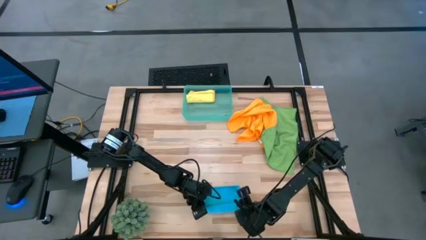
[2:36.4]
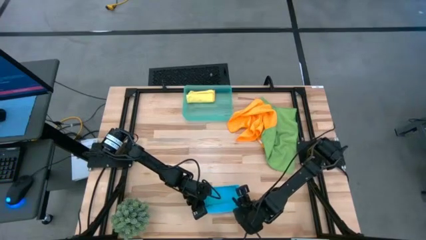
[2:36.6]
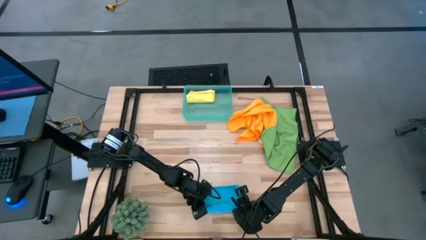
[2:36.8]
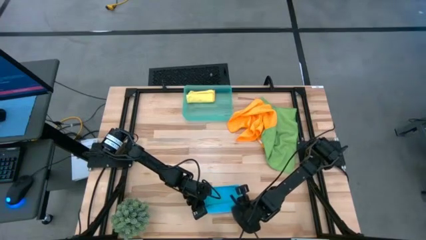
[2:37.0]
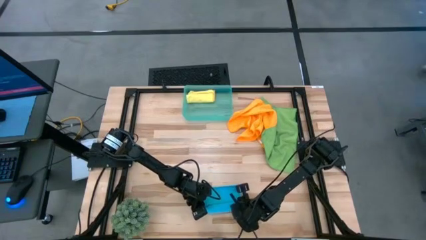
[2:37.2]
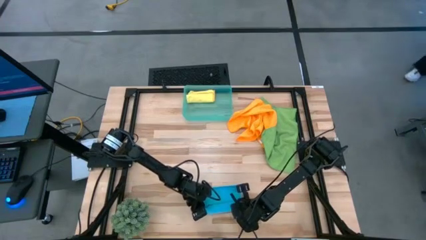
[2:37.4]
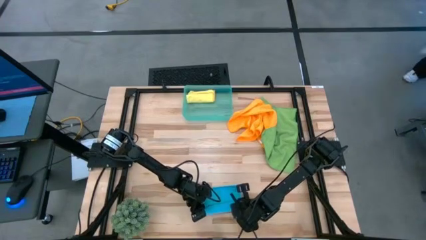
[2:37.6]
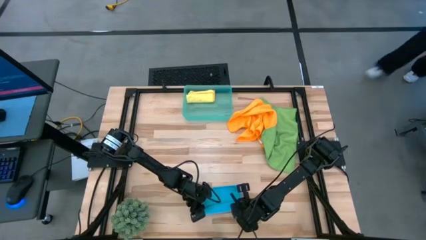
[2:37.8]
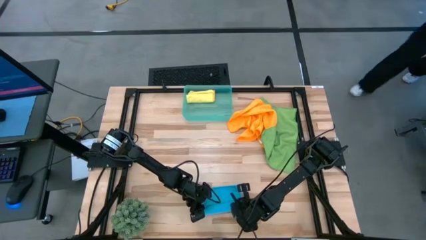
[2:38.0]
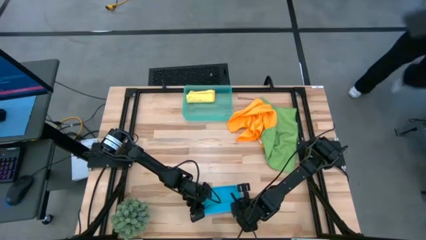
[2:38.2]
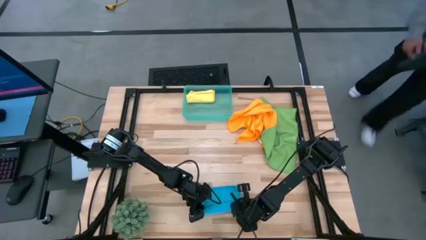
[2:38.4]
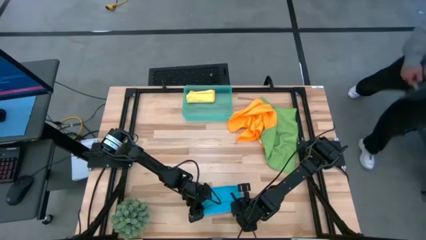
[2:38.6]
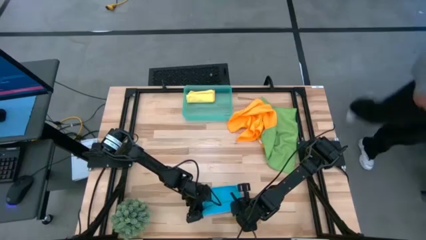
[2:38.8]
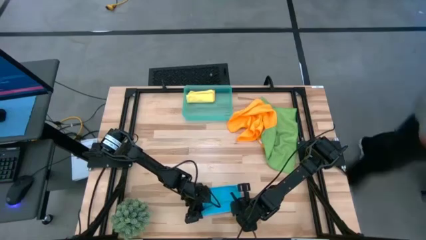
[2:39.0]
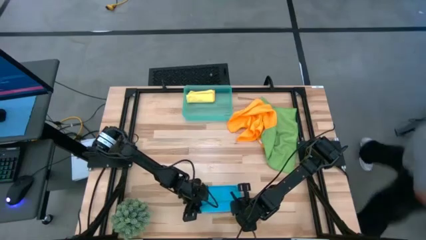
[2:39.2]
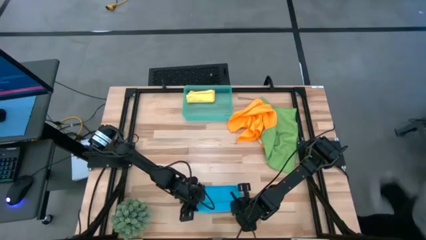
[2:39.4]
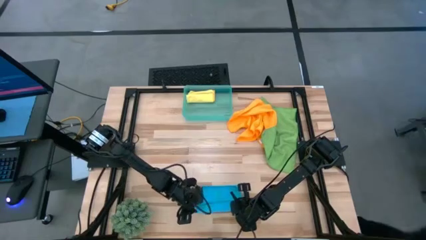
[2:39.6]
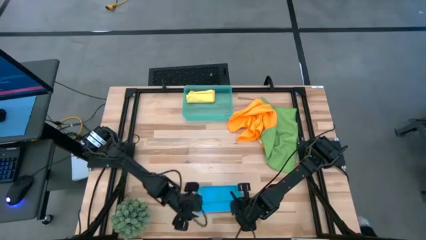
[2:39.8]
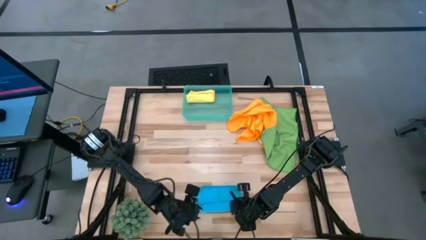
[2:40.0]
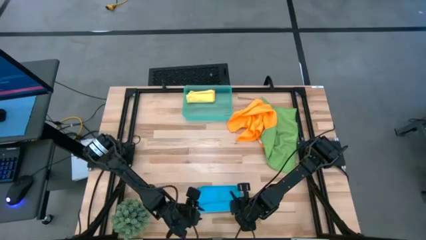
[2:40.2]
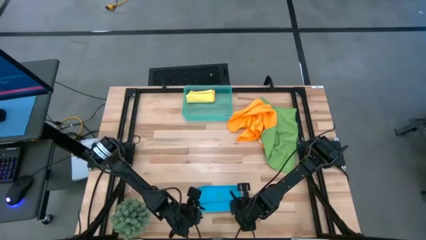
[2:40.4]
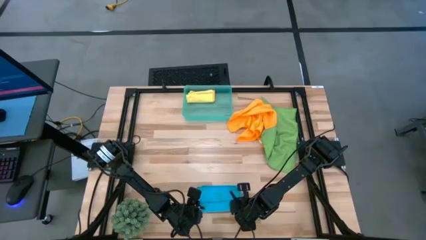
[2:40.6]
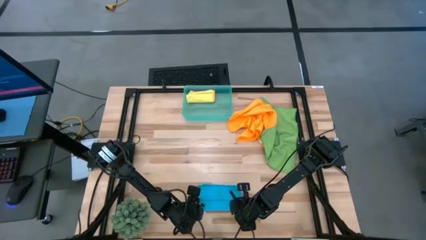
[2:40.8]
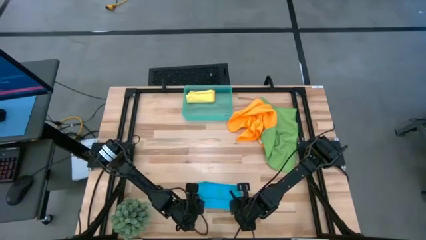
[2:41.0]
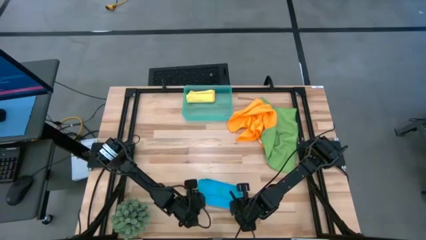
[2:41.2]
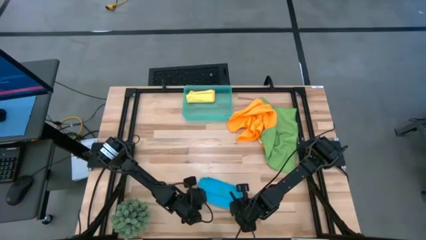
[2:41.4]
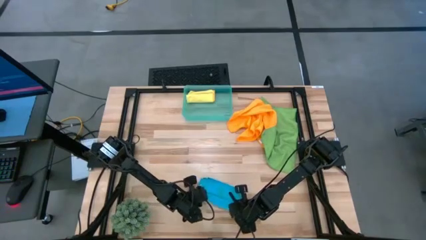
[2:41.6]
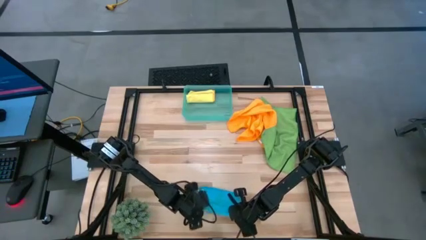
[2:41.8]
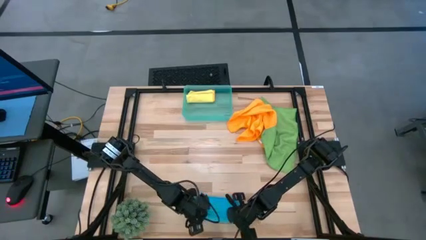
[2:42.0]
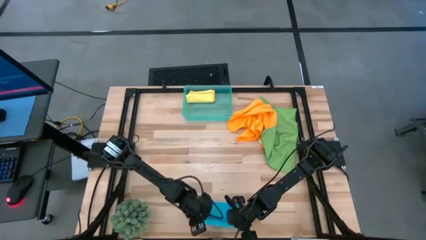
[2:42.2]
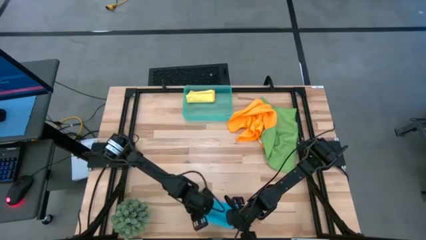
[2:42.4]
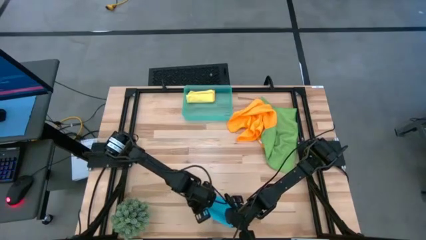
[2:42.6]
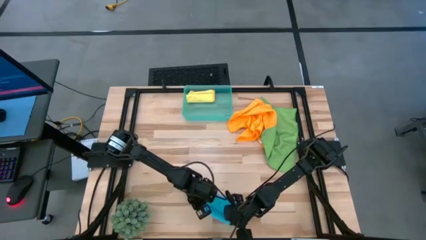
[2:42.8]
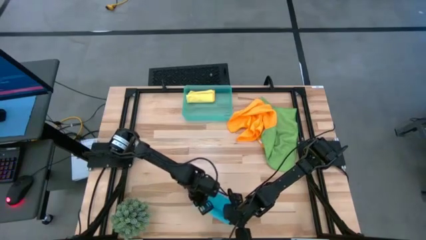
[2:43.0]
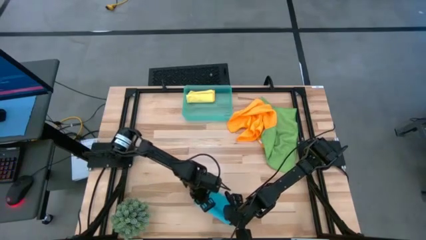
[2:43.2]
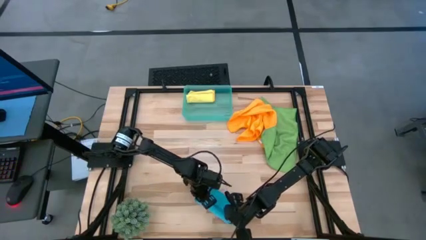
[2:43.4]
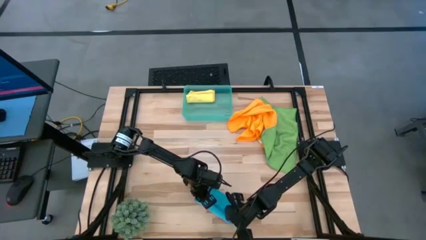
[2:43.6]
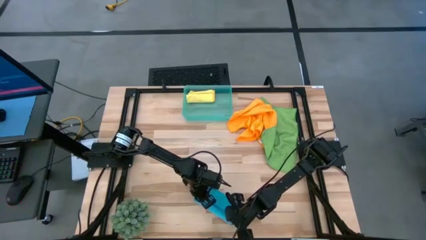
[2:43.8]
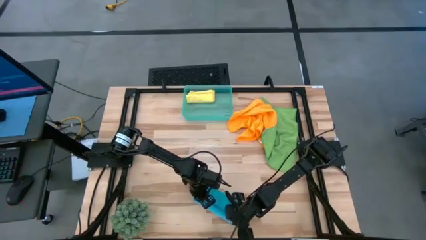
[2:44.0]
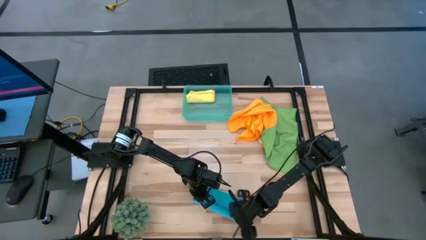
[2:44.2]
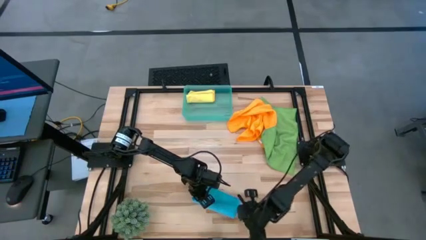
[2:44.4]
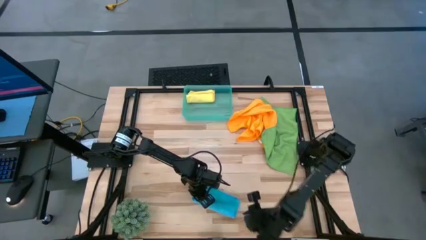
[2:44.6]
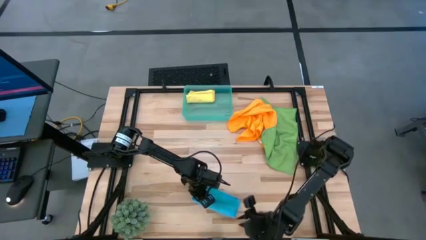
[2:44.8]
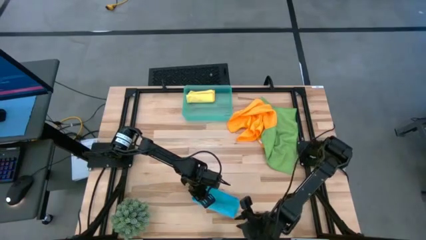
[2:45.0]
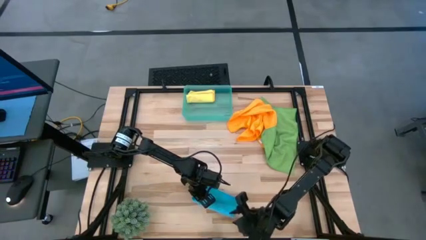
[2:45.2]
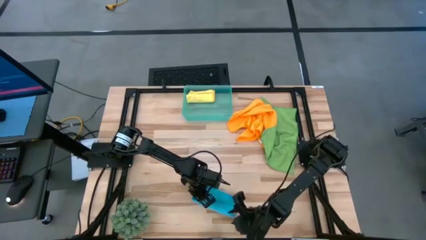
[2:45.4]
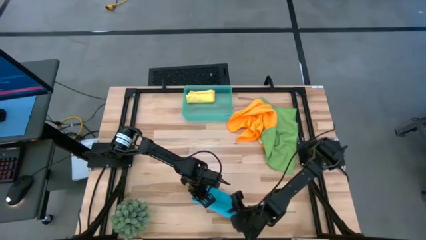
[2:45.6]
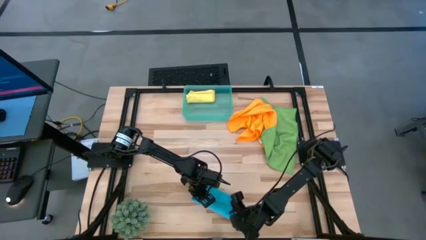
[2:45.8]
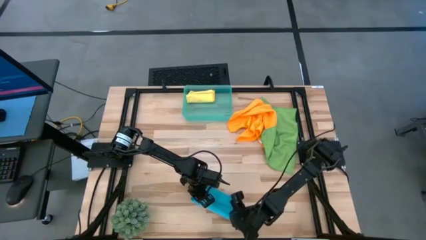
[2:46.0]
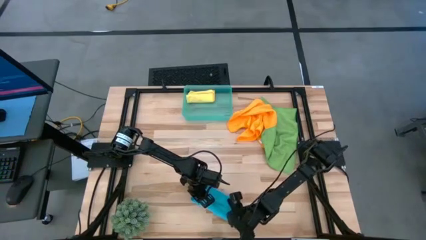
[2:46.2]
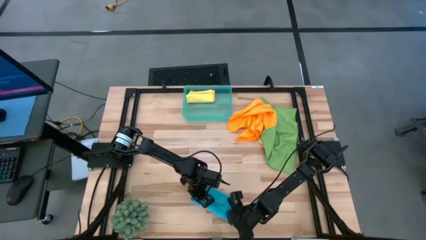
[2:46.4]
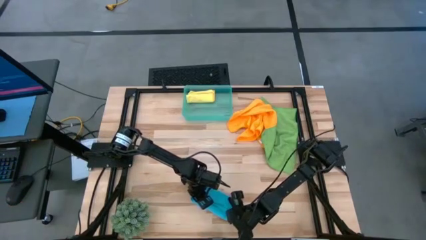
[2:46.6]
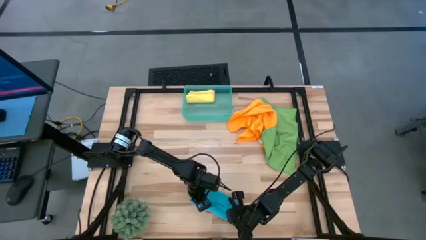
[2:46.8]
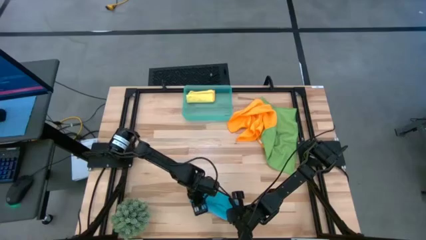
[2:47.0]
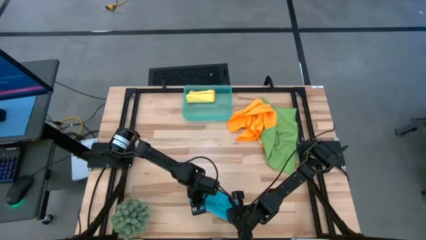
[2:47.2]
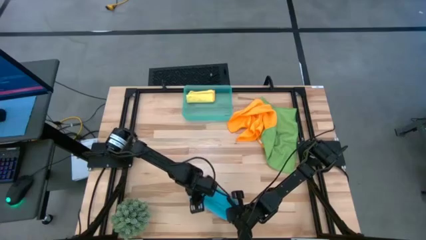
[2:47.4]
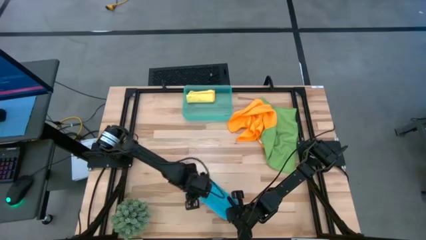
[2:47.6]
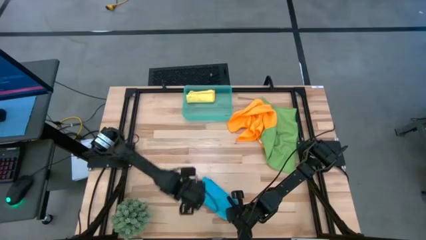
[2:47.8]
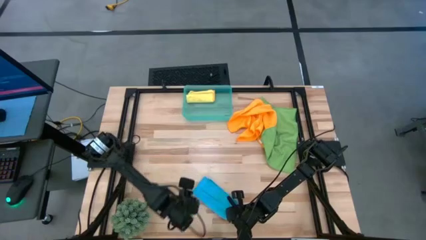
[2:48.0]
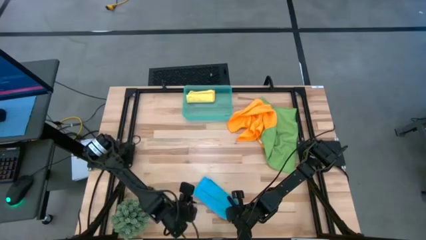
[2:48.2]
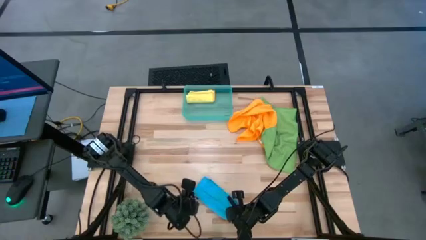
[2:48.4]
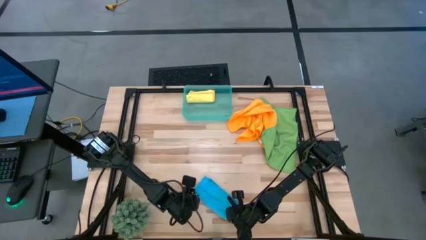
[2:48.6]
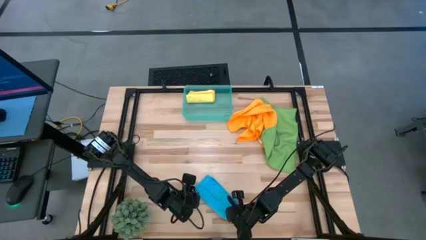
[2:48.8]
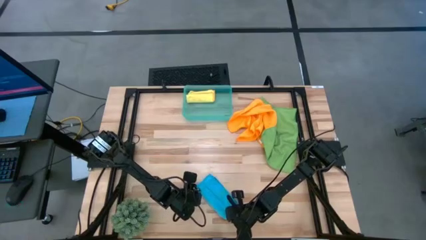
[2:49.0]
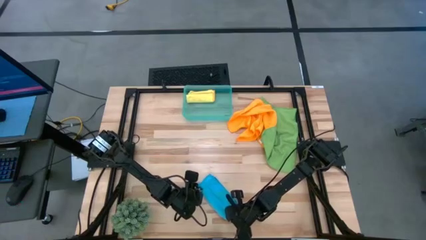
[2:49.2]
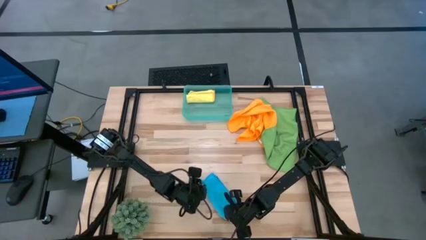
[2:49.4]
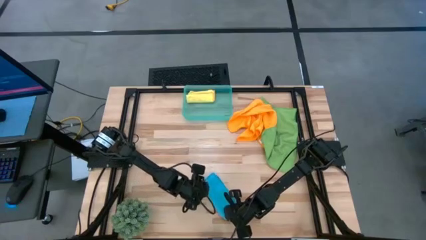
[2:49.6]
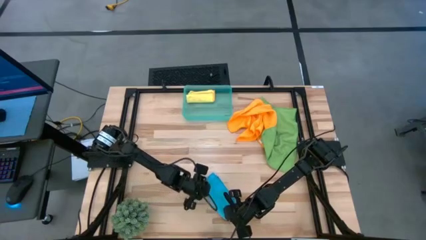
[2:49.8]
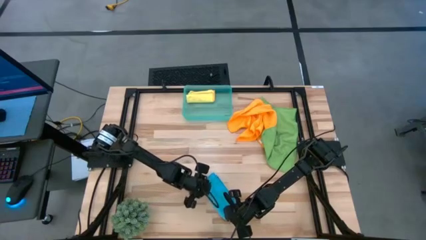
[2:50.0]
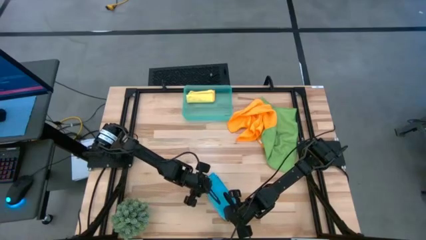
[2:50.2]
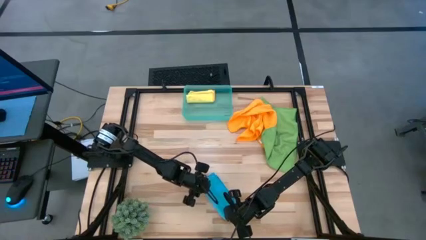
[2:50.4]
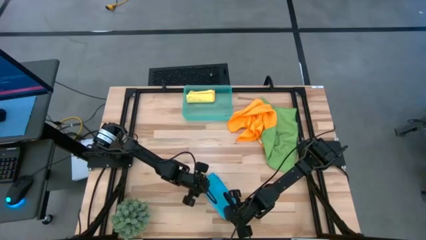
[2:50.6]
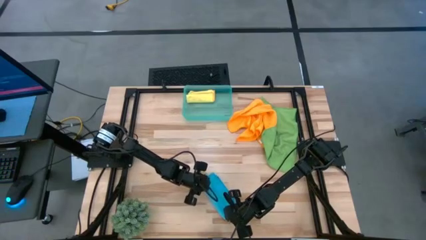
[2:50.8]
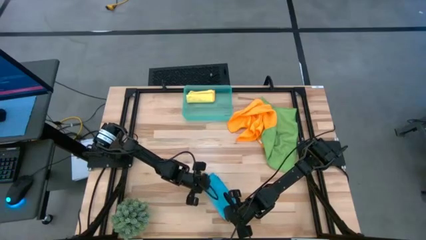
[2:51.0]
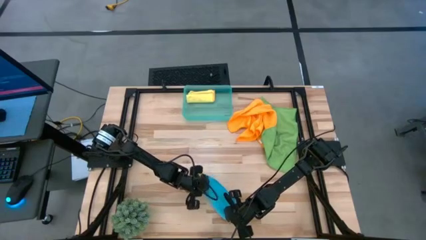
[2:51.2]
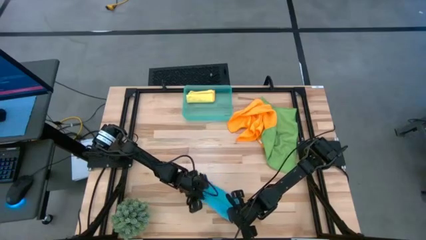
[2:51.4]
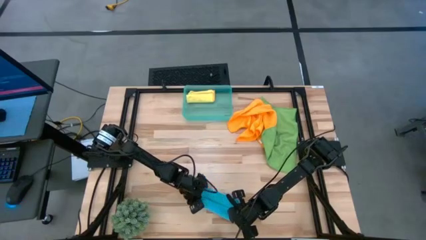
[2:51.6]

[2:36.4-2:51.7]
Task: Roll microfiber towels into tight, uniform cylinder then place into a basket
Roll the blue microfiber towel
